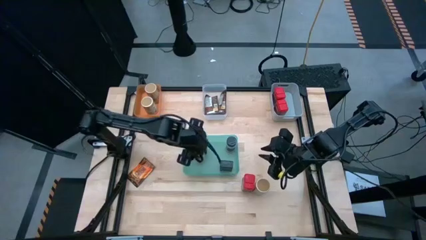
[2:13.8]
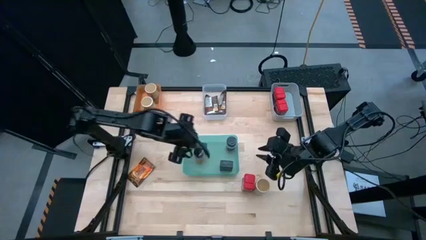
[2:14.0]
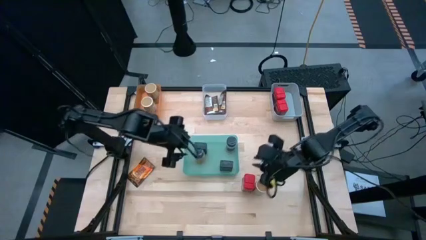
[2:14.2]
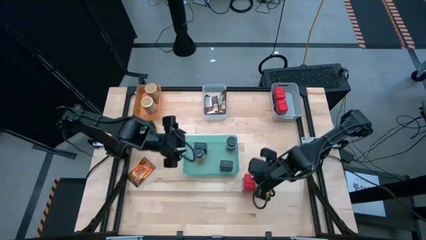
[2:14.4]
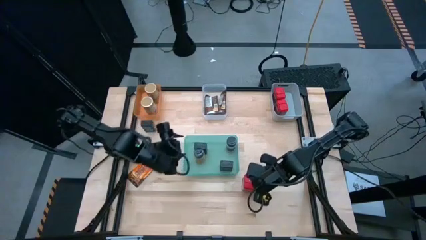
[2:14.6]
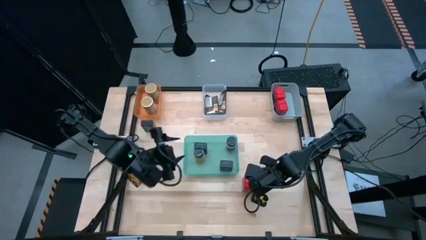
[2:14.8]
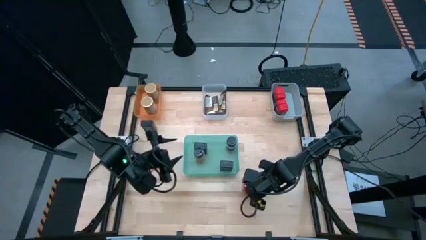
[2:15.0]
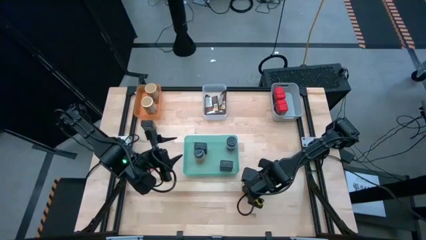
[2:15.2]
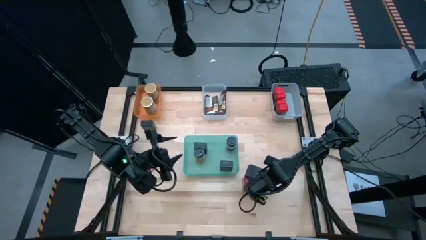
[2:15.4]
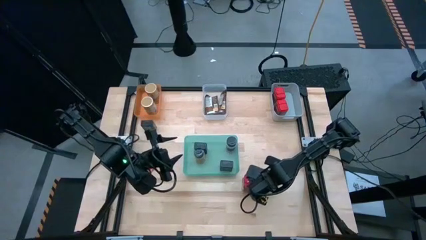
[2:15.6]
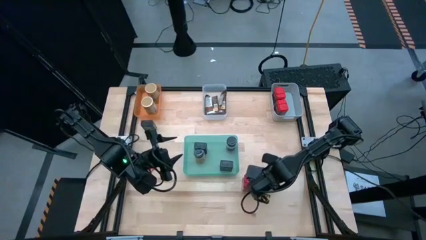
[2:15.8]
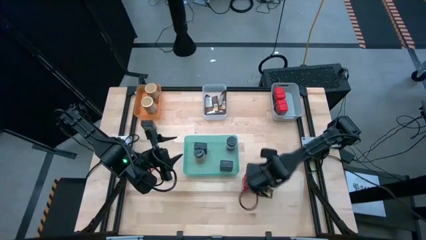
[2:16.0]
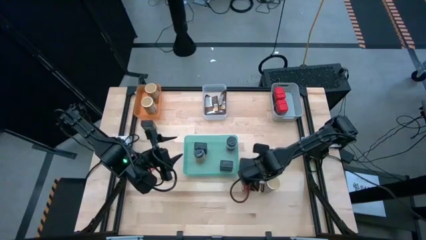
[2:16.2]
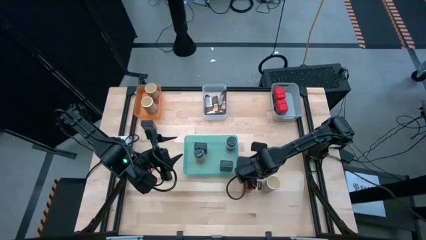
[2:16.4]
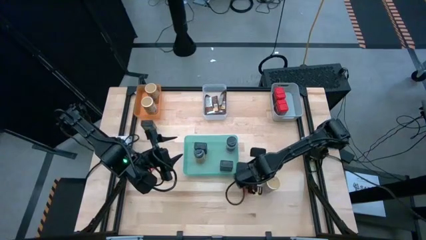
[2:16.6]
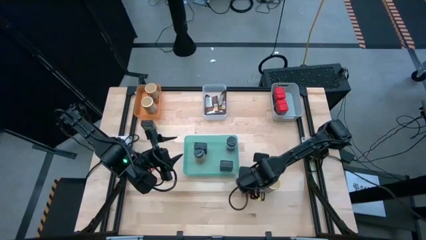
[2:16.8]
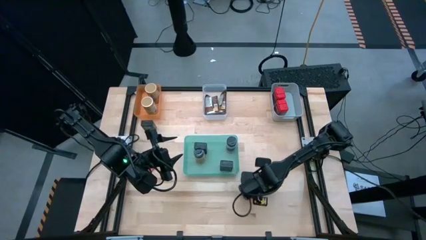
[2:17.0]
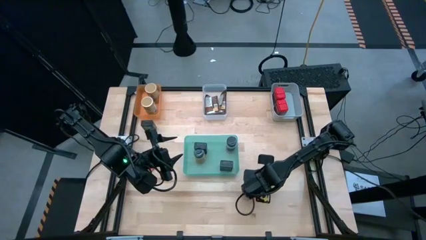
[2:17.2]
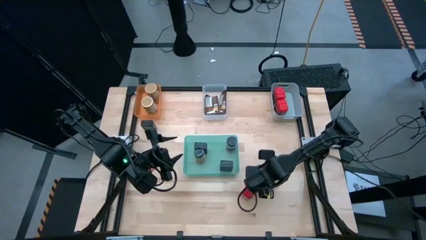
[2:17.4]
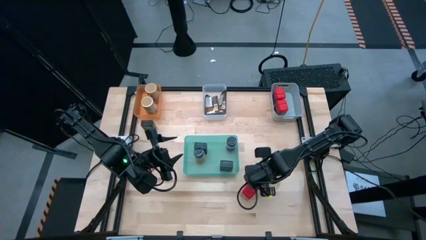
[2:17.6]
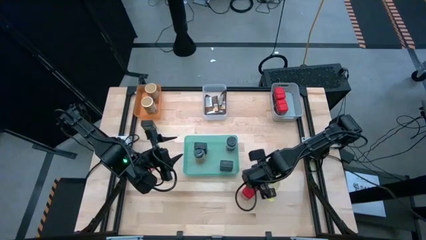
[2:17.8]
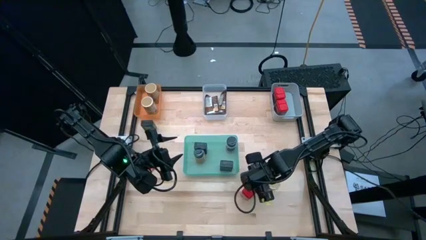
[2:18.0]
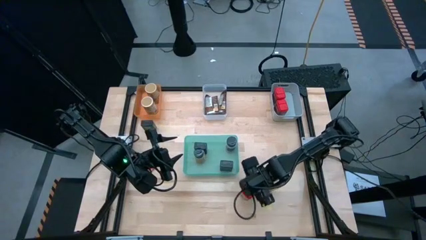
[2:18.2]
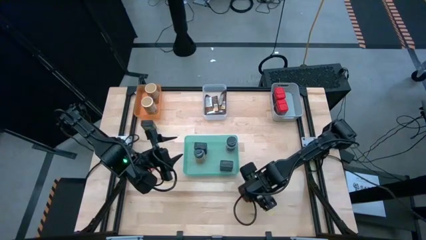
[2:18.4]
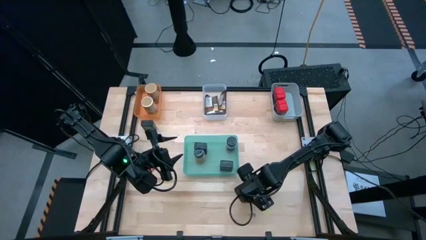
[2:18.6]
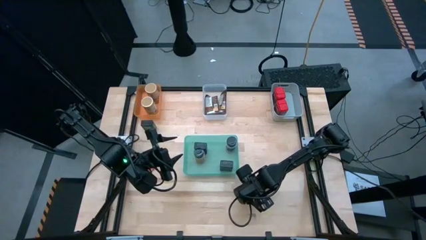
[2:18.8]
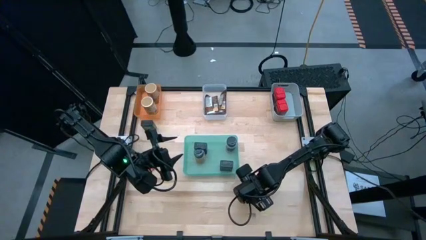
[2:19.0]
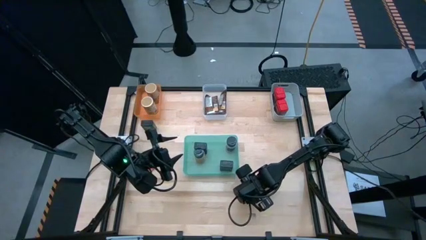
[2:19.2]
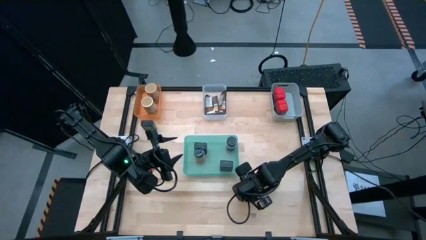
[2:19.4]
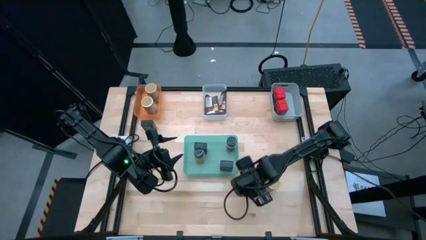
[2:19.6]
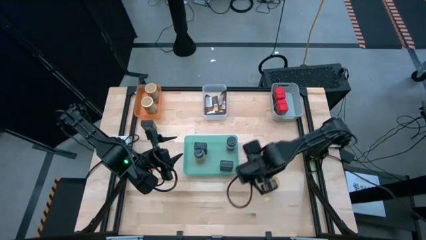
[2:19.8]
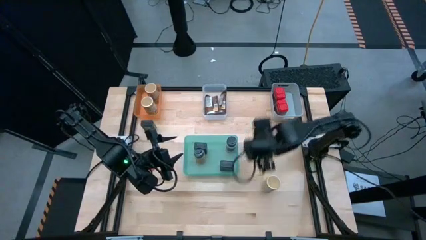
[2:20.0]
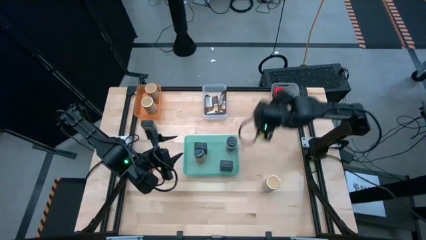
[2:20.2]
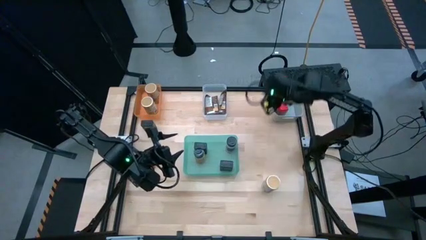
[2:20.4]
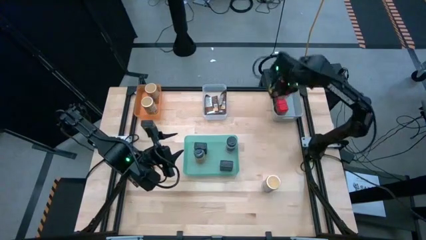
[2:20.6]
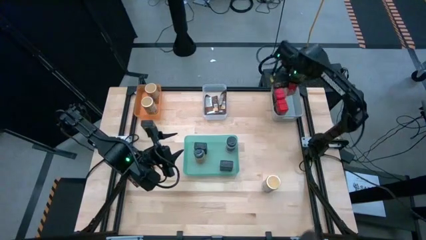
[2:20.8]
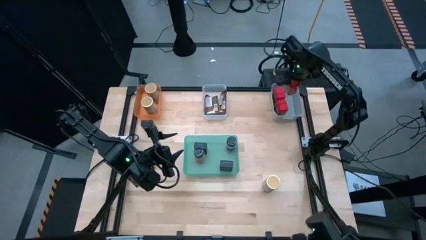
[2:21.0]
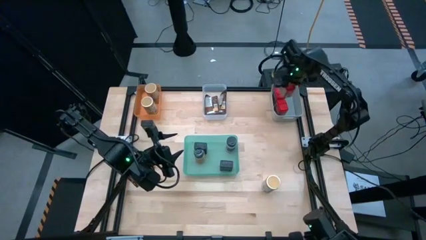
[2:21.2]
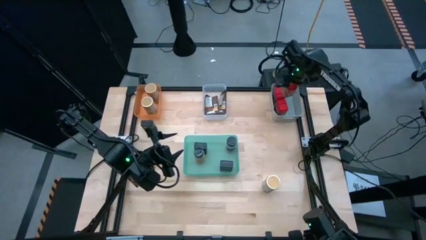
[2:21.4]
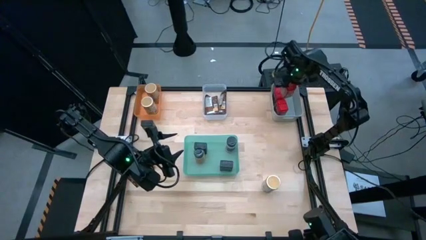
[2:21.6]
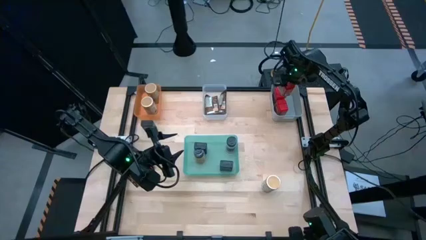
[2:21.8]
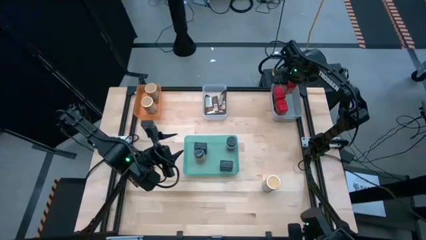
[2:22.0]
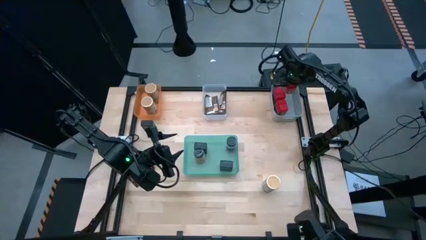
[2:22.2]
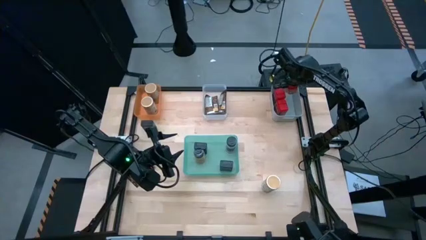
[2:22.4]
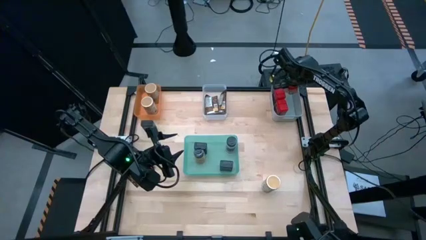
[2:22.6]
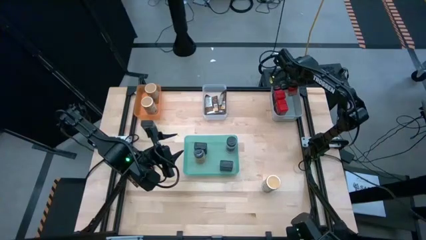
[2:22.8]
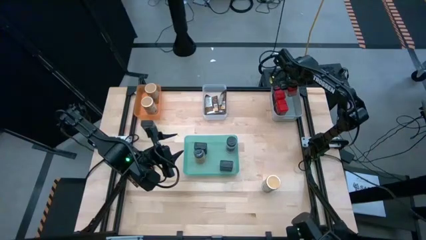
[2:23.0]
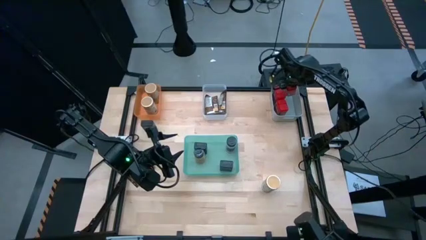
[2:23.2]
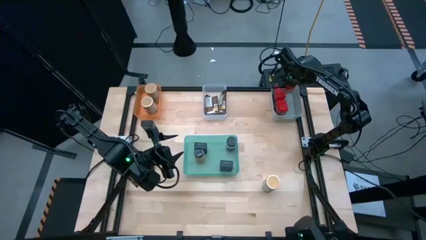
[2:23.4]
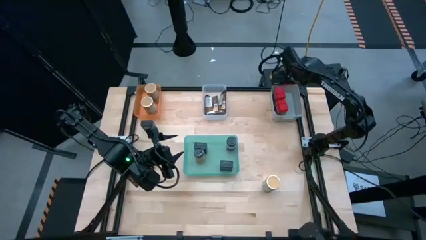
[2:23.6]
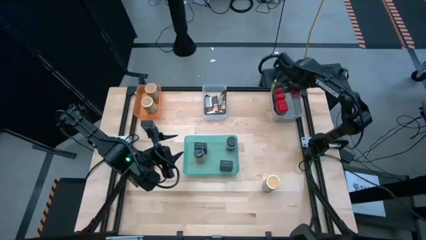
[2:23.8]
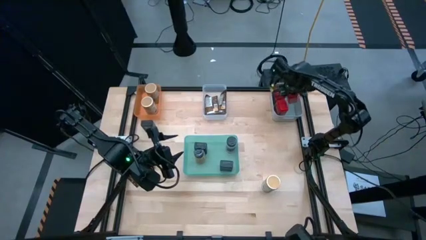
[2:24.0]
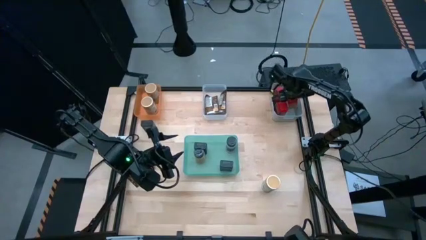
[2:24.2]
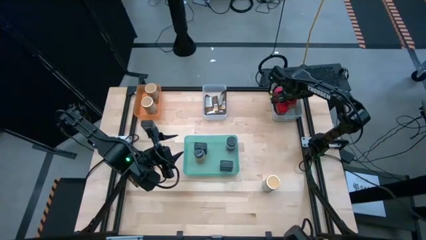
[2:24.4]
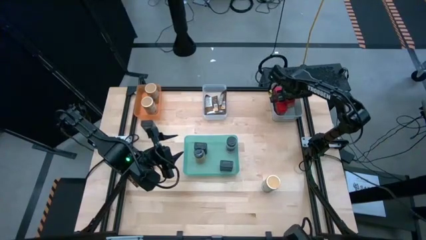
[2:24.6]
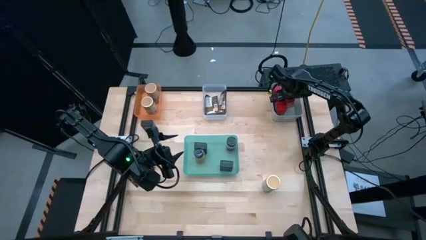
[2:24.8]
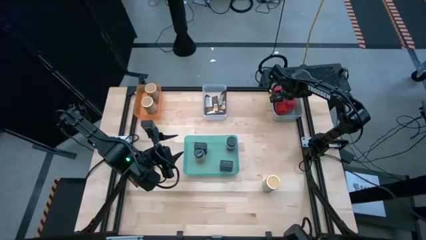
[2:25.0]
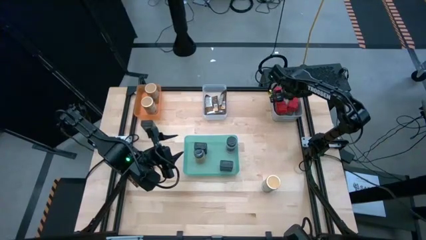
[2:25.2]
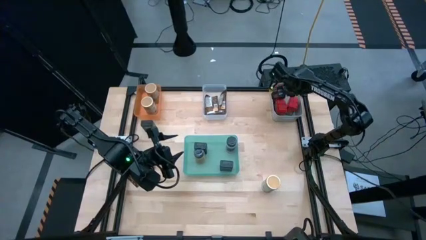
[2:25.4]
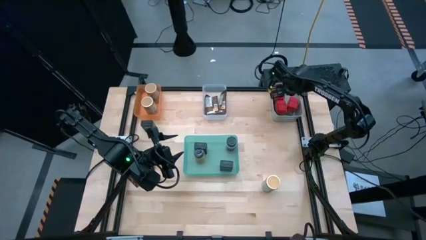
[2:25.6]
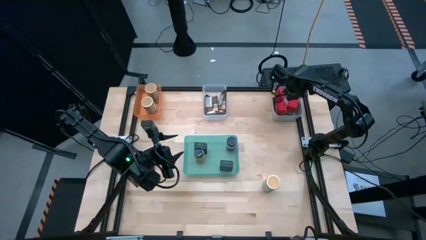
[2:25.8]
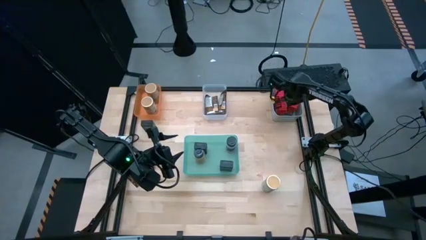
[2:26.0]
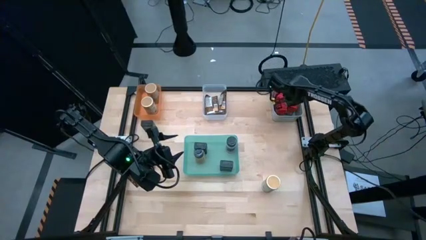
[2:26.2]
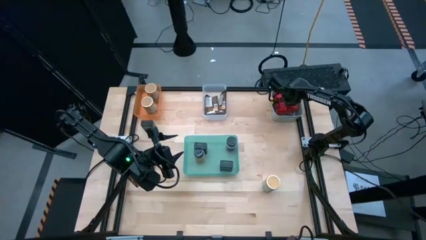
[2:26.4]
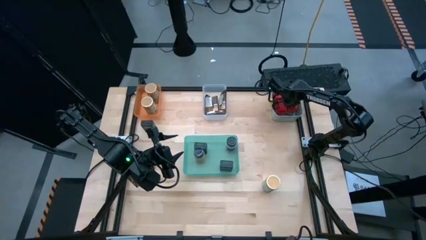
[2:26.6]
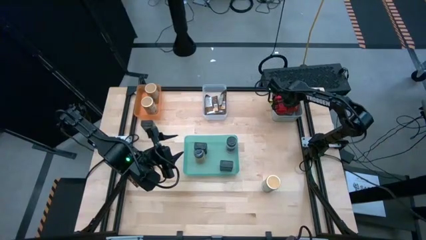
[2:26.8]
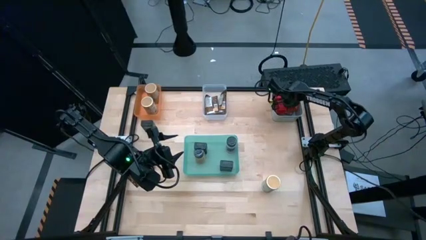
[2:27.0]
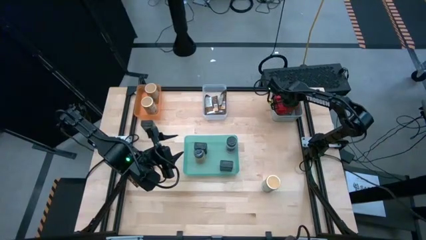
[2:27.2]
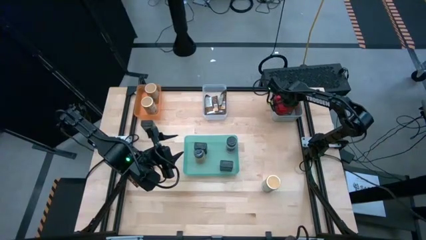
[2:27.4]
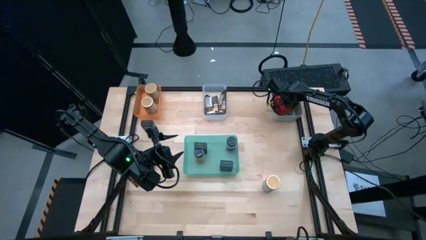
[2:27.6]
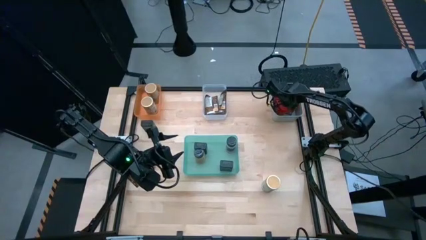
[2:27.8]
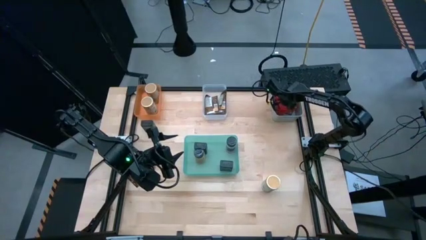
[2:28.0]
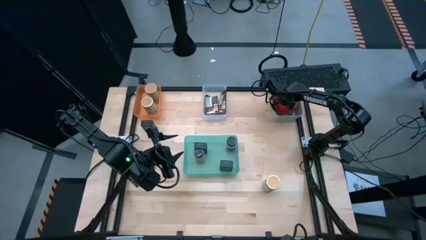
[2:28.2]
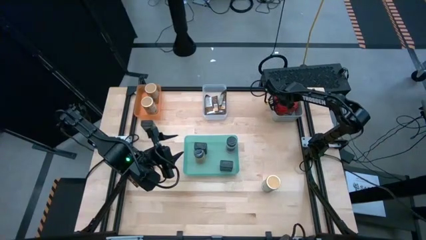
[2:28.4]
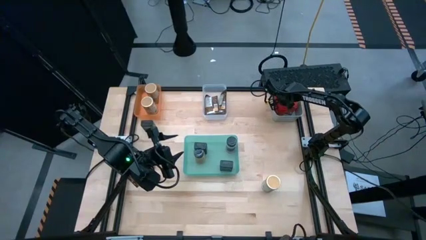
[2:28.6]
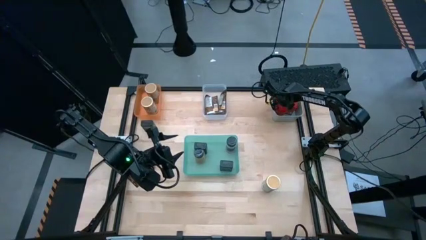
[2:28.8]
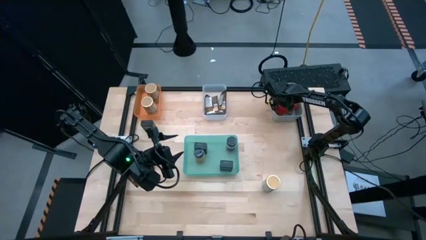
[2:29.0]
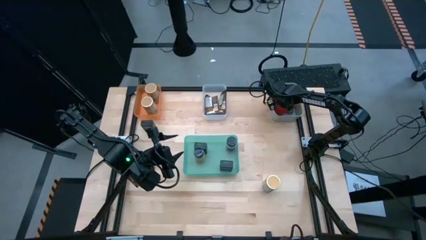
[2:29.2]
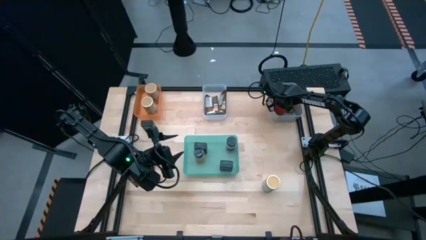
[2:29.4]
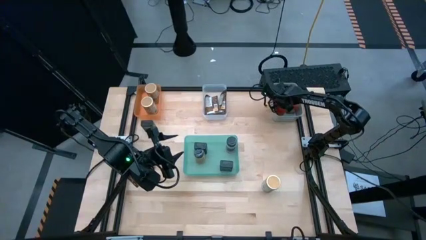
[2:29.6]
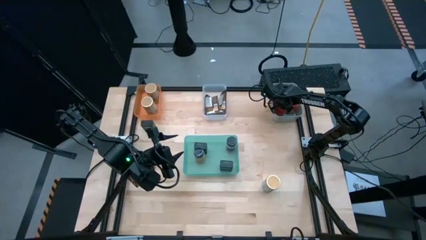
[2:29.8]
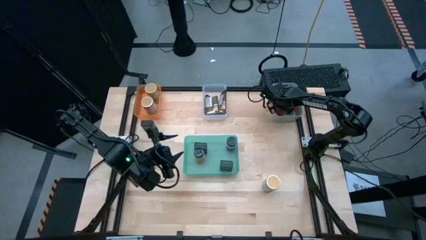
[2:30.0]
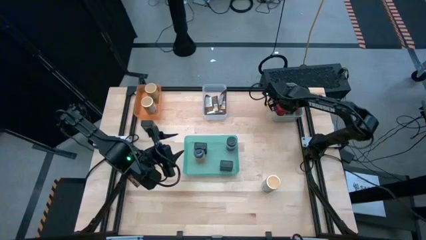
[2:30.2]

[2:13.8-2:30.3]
Task: Sort spices by type
Put the red spice can into the gray bin

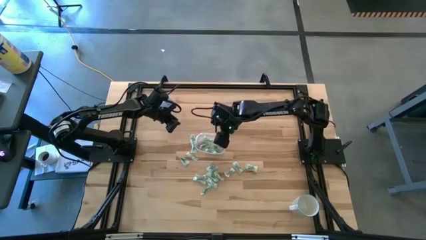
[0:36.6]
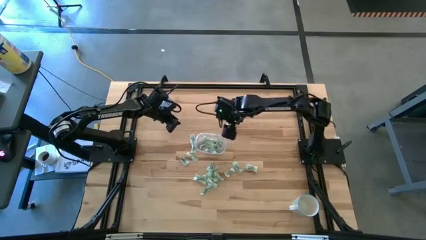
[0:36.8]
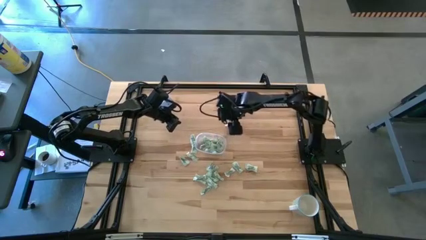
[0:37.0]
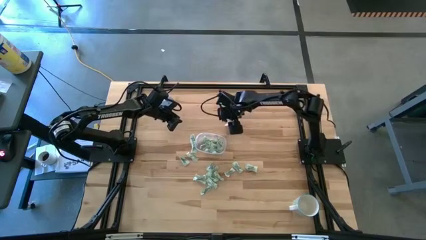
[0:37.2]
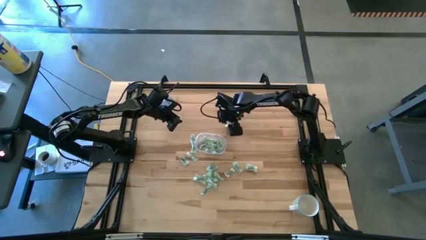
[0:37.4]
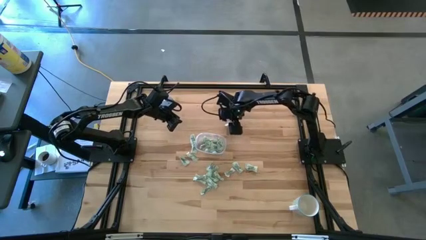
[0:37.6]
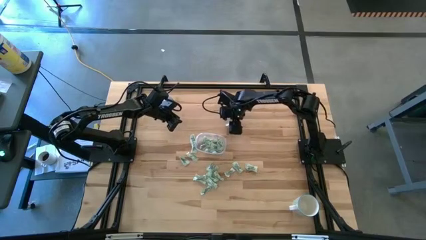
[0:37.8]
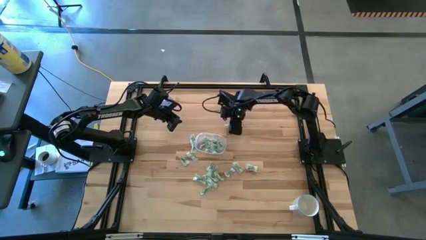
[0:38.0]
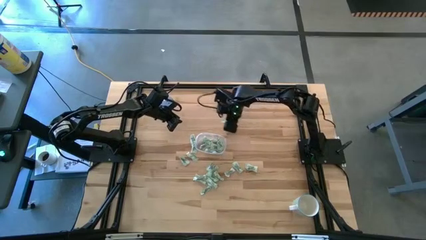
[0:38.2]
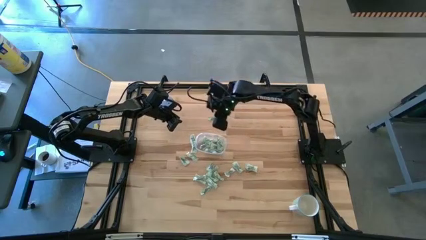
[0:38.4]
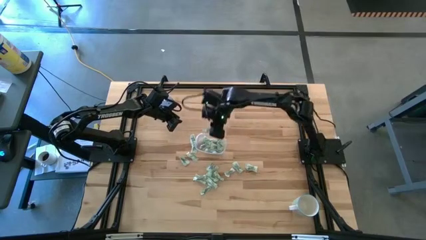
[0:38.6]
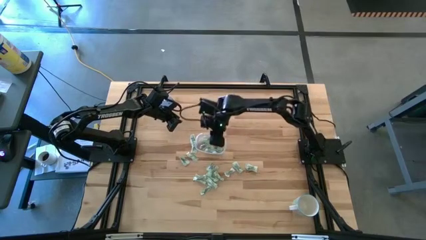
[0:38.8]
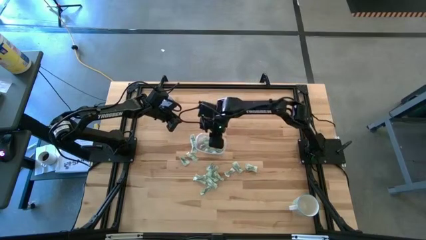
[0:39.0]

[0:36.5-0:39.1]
Task: Pick and place Stevia / Truvia into bins
Put the stevia packet into the transparent container
